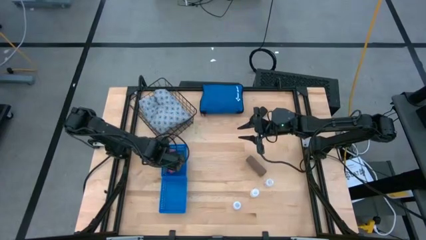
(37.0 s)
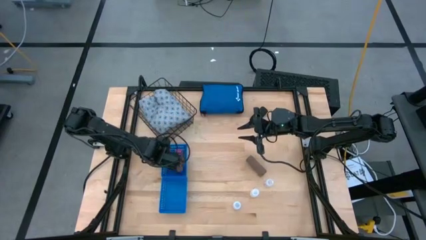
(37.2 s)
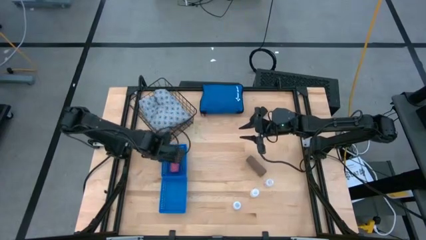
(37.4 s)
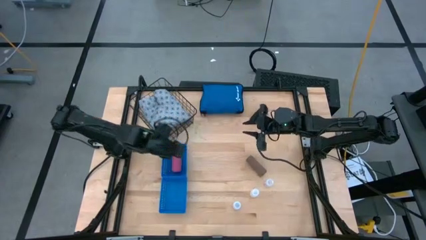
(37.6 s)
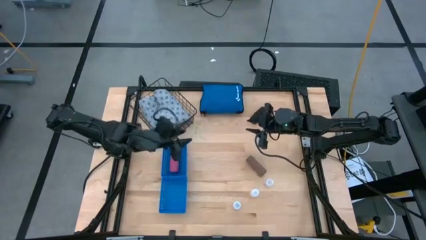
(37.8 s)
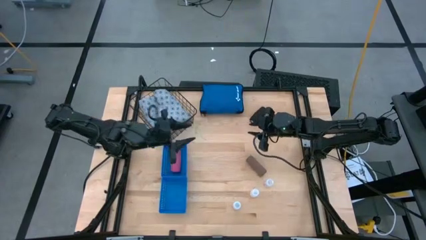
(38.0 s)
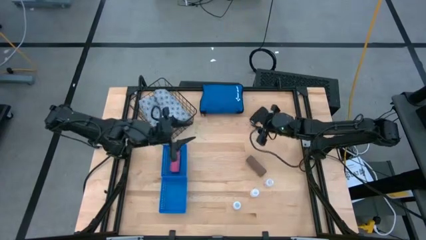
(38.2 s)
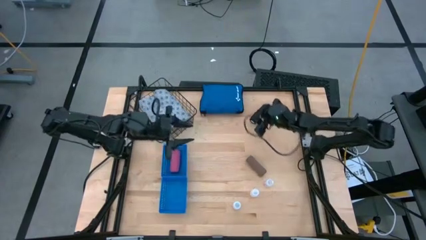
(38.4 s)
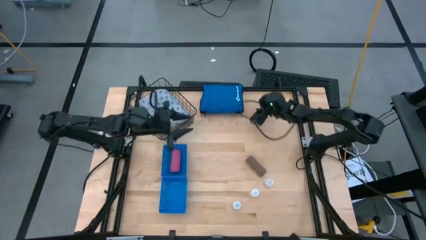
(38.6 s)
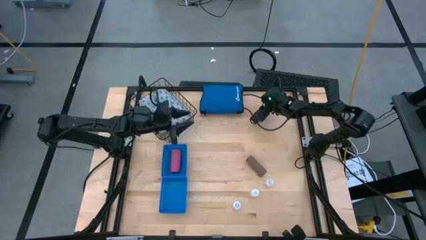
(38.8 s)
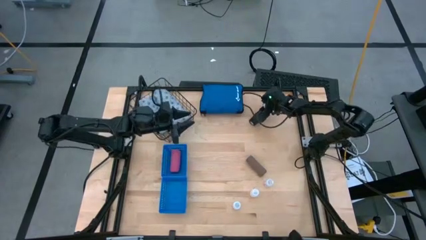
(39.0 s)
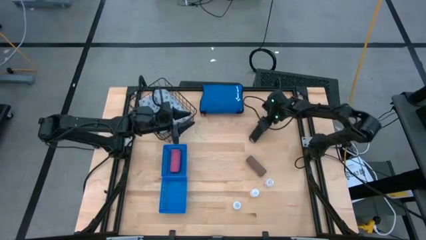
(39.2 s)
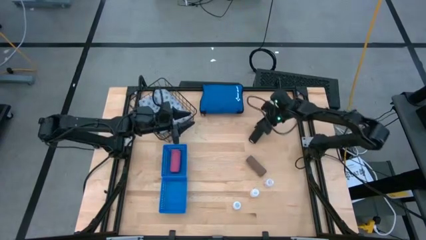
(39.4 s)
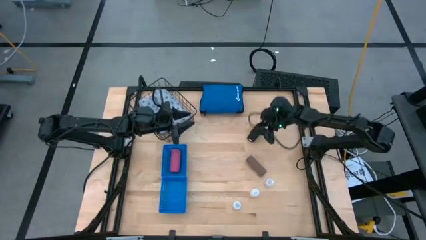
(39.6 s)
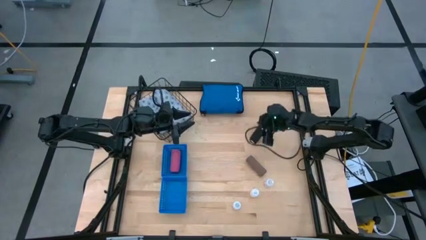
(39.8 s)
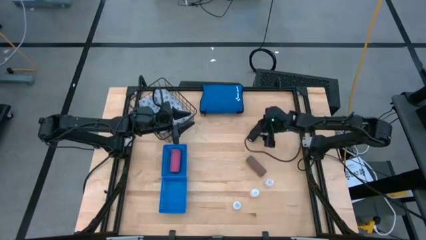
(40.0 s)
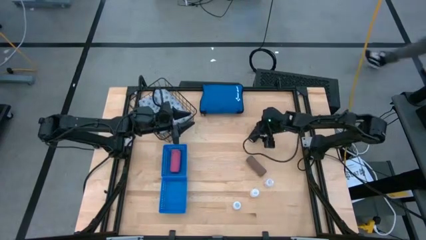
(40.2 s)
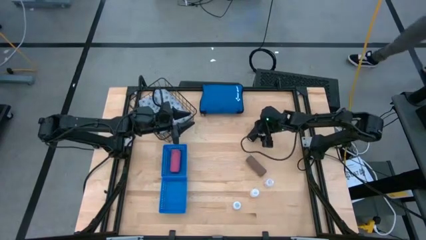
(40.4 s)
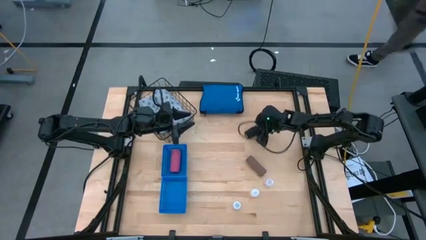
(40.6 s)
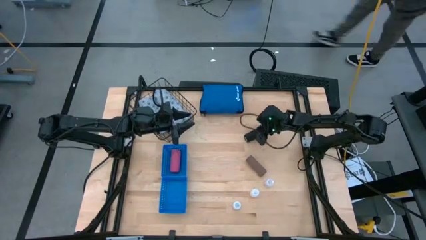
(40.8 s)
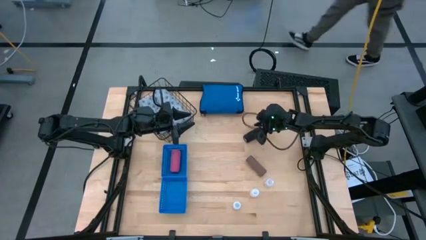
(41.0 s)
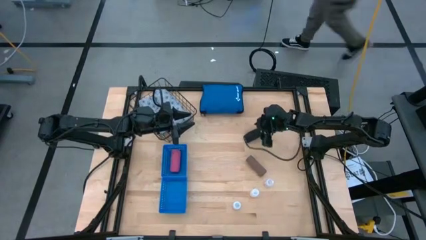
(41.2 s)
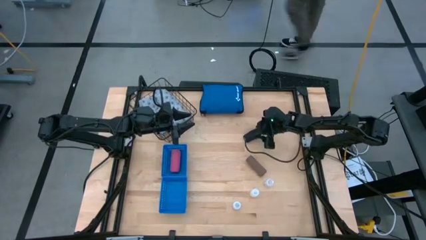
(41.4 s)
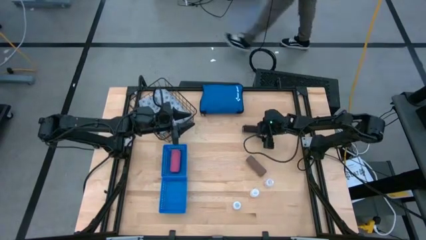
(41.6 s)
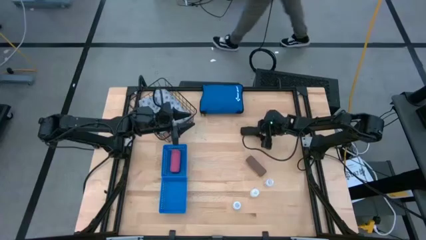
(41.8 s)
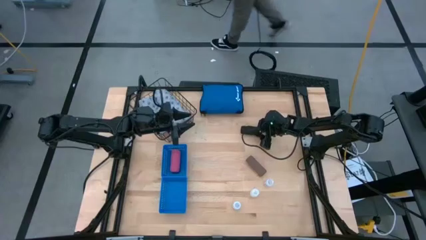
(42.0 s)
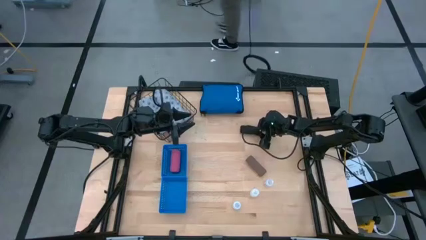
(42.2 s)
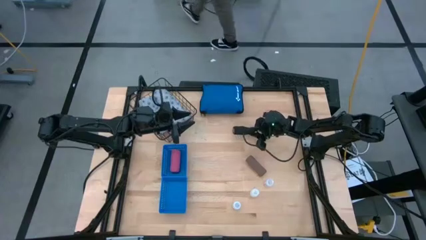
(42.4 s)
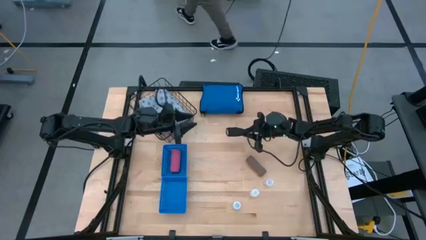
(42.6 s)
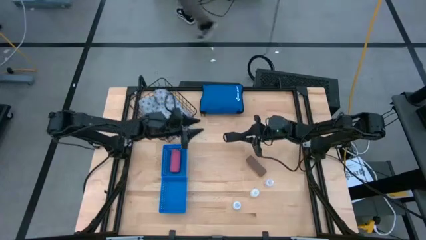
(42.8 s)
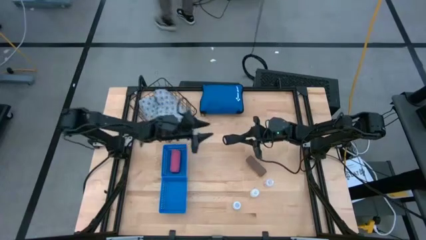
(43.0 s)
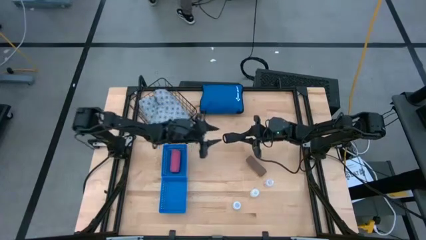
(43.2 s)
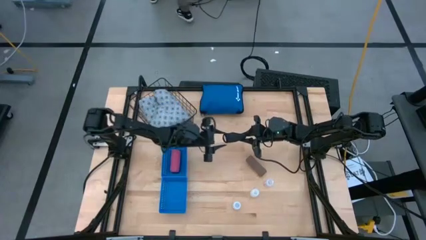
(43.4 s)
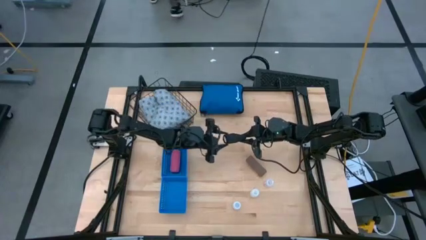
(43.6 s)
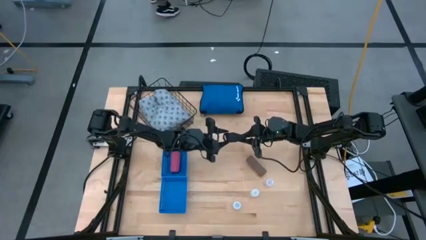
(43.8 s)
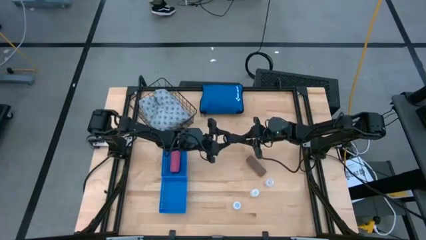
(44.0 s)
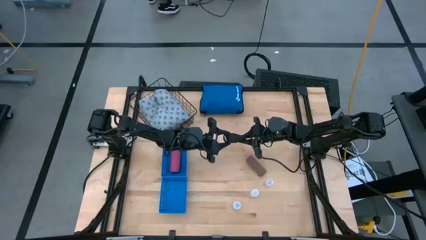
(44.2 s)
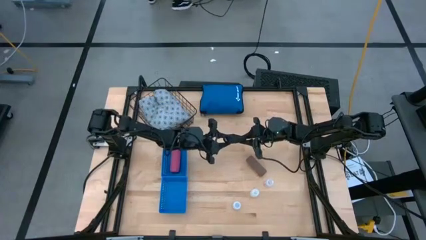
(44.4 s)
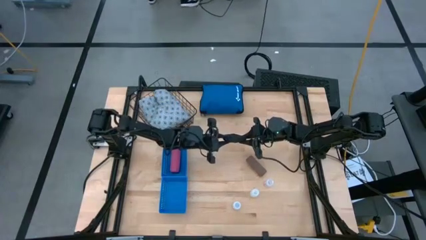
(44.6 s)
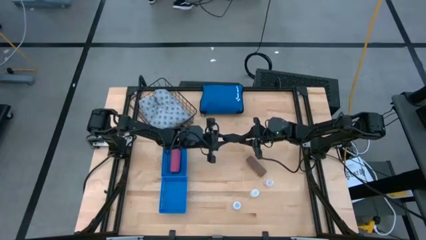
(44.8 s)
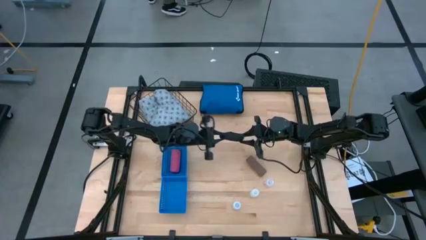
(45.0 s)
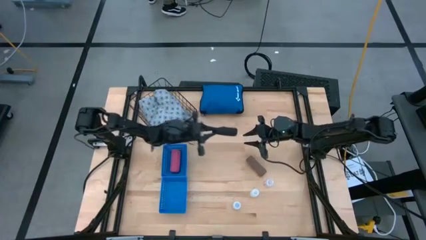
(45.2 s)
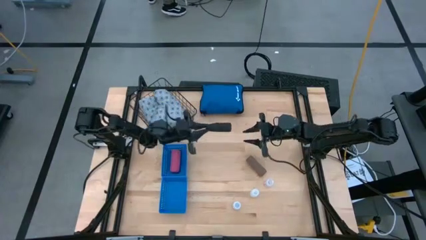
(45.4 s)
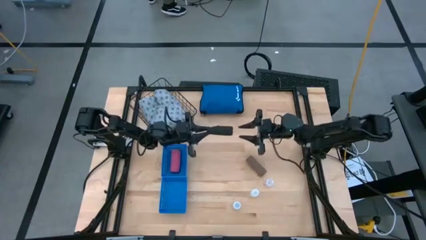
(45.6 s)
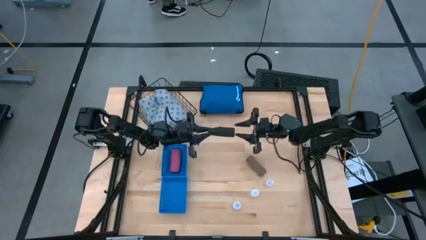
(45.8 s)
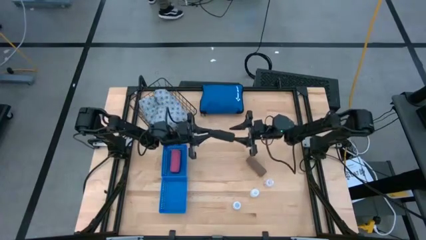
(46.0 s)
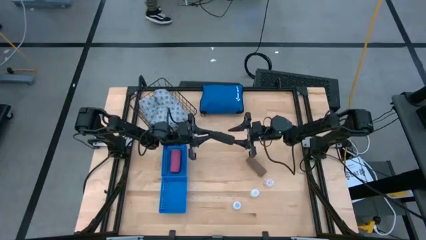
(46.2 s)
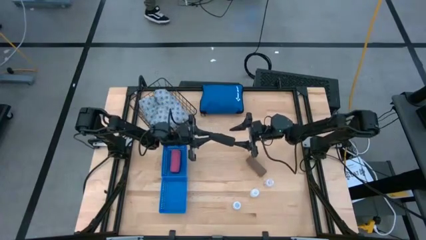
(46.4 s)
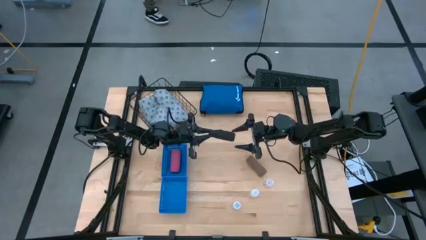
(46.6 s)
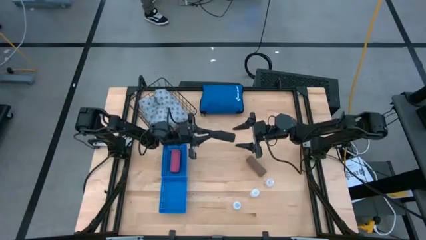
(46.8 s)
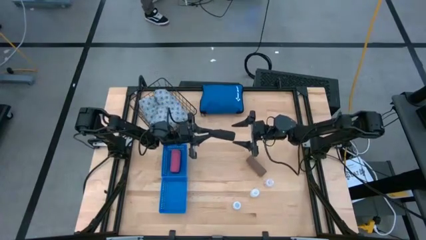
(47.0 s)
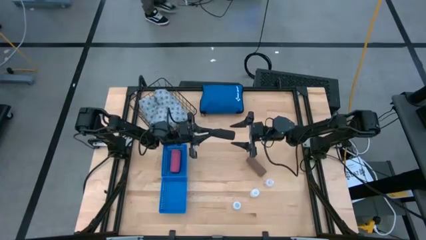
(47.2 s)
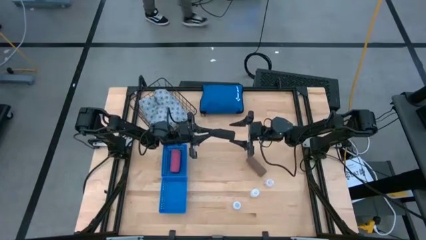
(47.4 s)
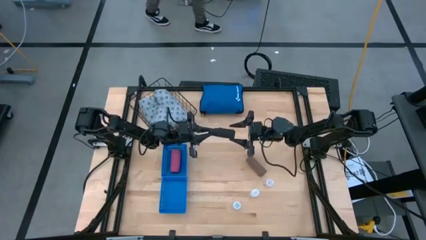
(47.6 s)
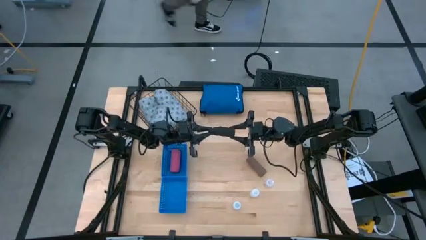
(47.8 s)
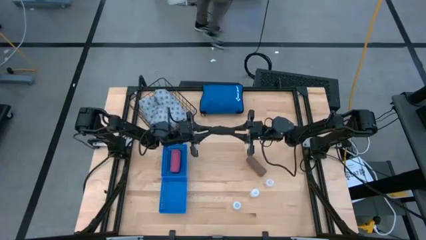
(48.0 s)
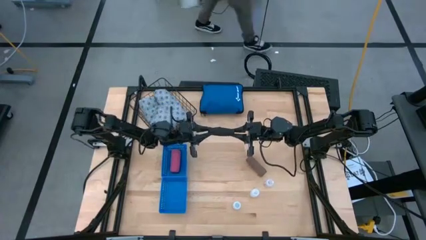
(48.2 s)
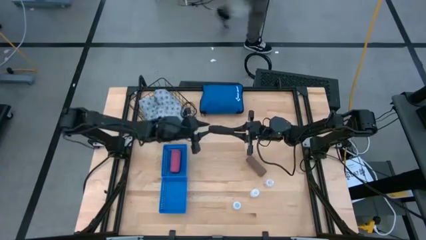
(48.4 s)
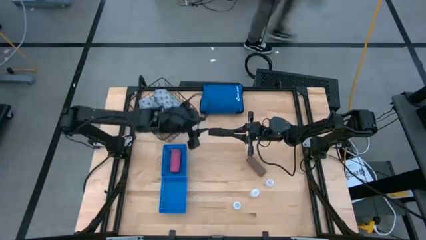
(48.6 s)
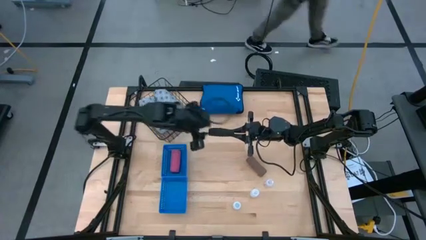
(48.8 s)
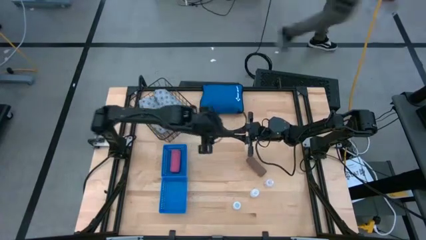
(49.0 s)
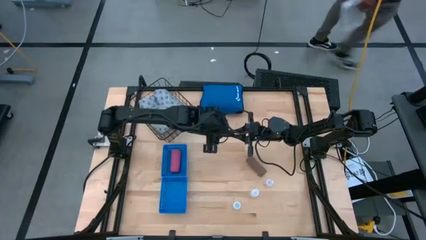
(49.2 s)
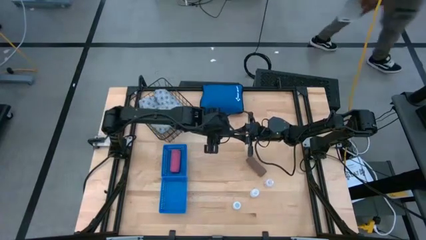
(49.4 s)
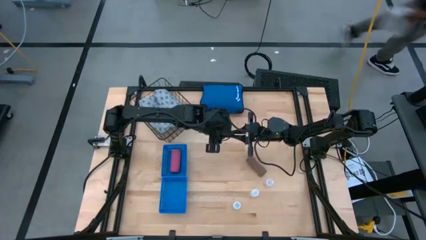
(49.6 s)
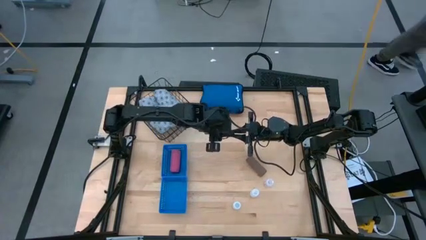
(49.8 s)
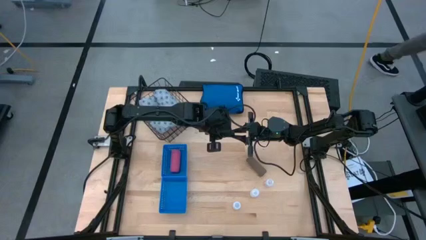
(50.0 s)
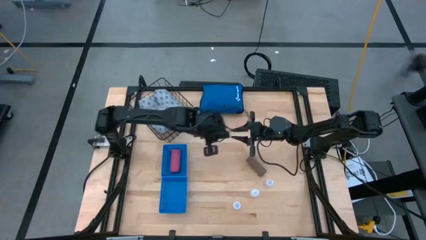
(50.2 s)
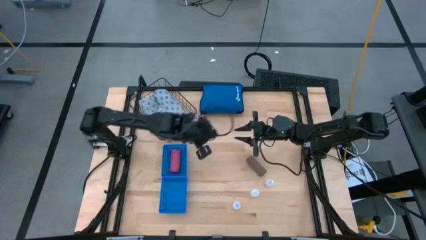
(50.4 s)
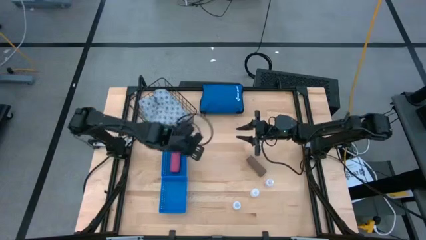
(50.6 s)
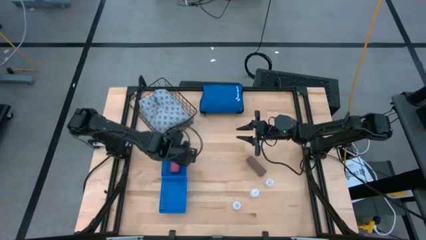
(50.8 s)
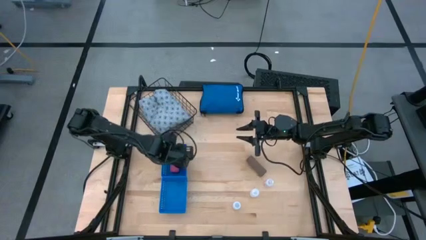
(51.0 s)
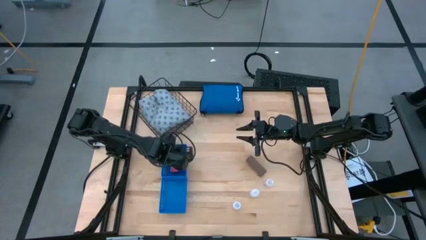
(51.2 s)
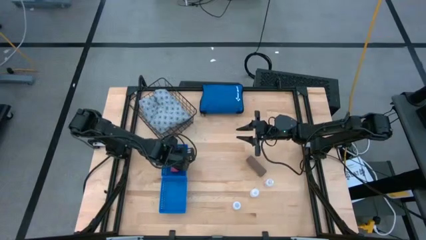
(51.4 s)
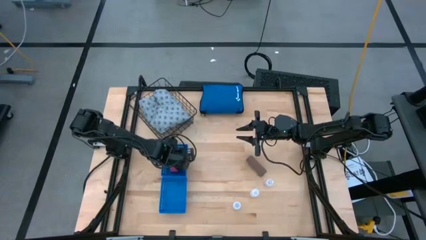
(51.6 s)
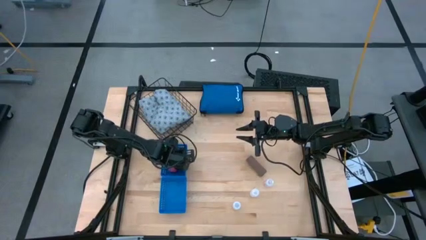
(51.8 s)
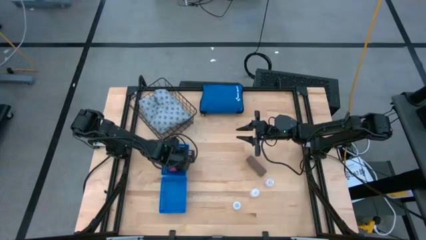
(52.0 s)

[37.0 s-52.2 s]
Task: Pick & place medical supplies in basket/bin
Put the black bandage into the top blue bin
